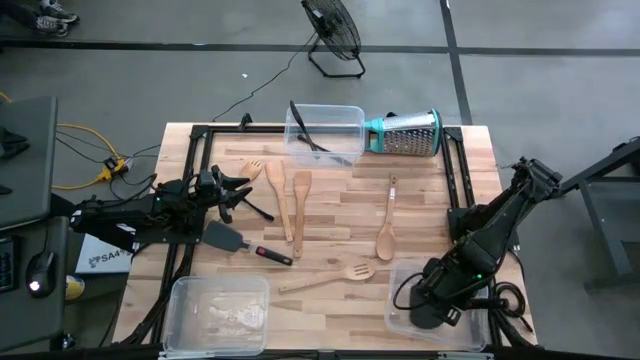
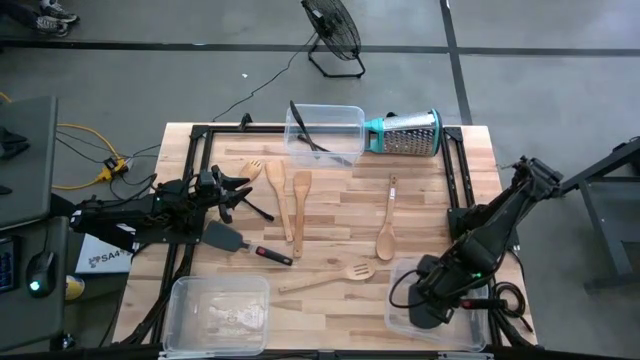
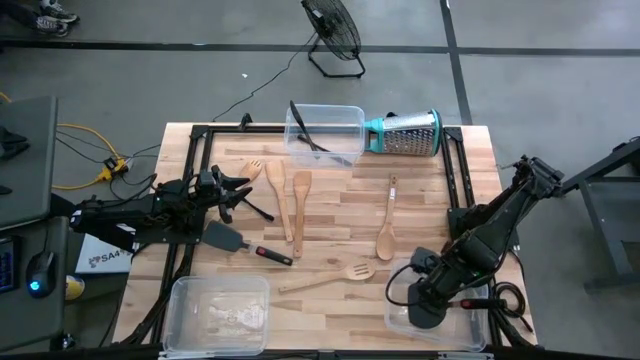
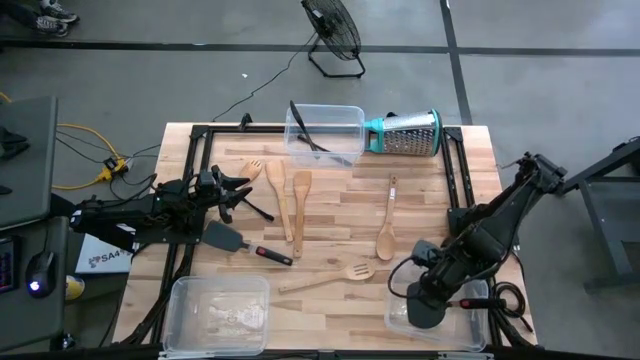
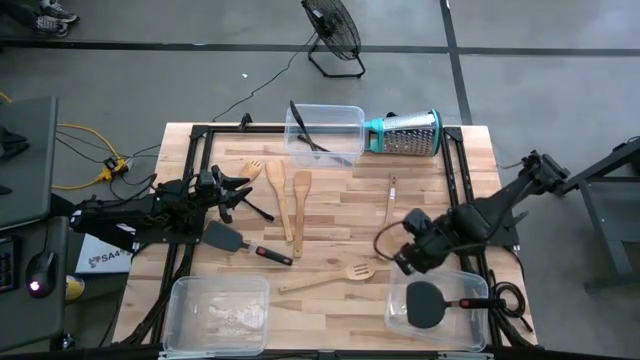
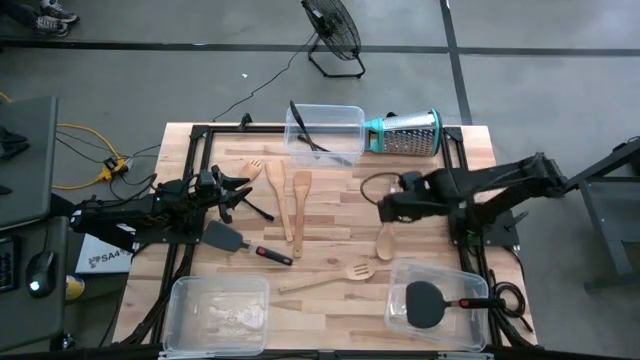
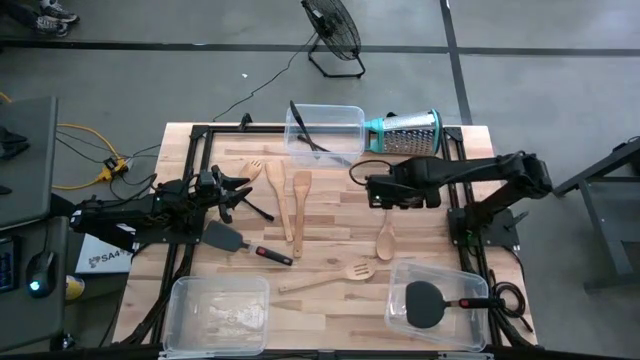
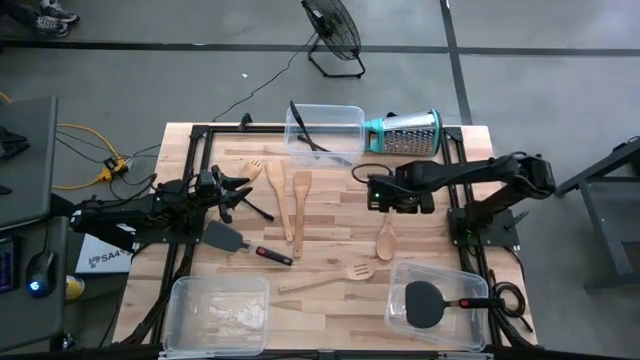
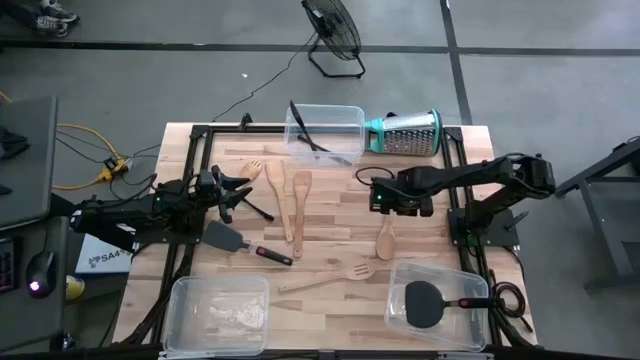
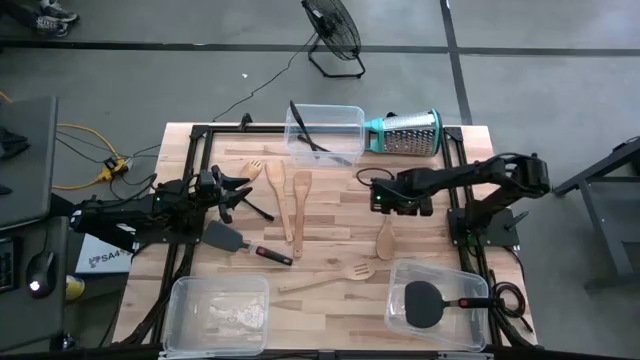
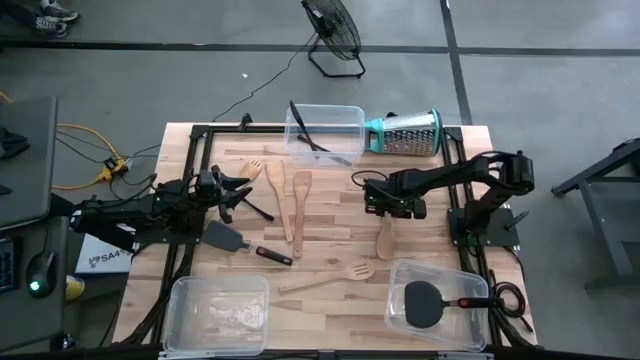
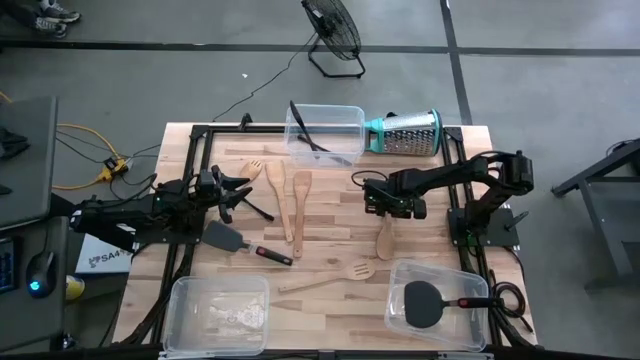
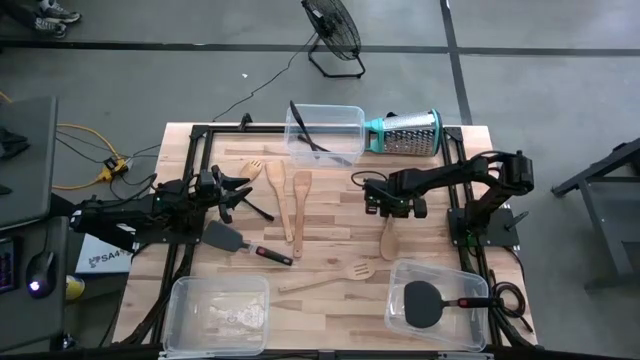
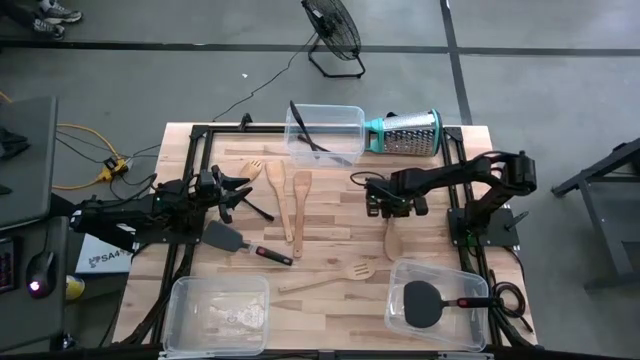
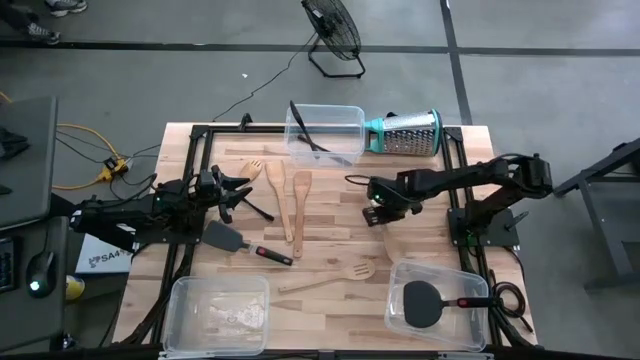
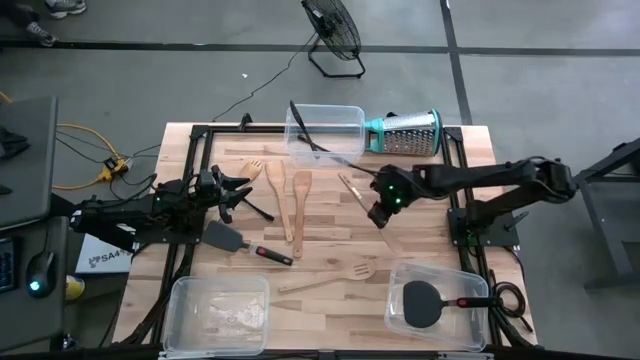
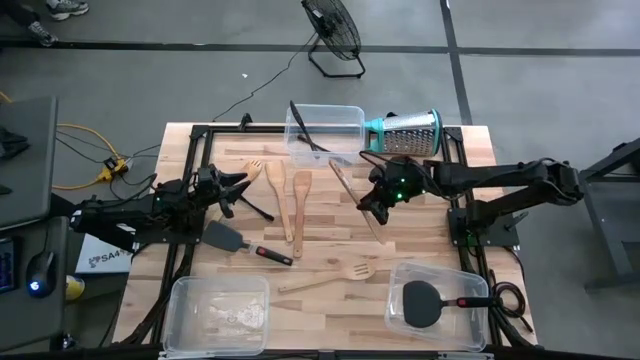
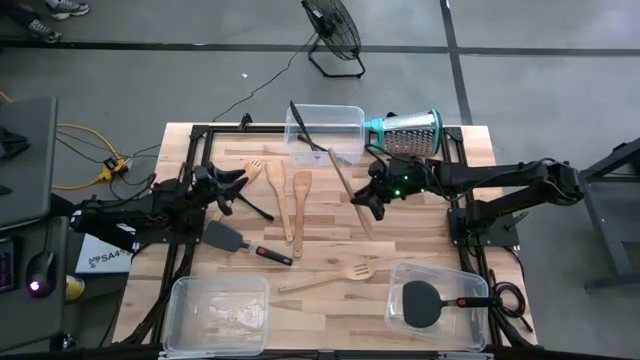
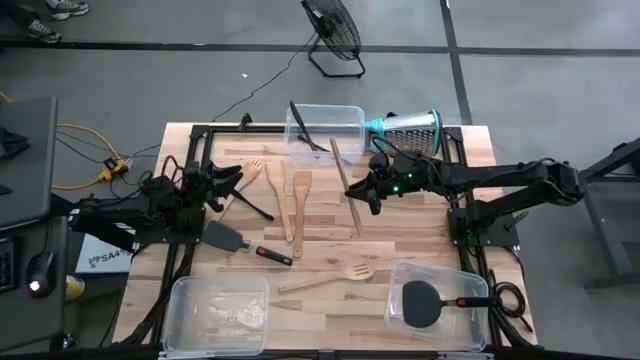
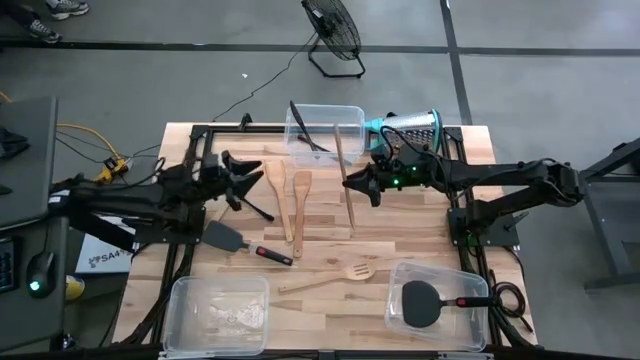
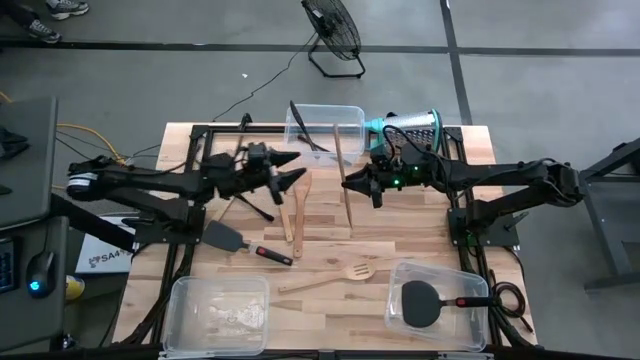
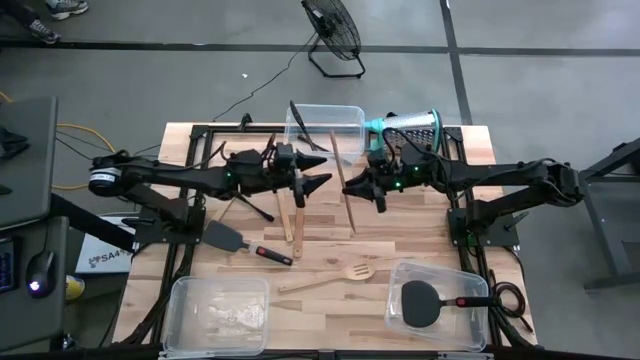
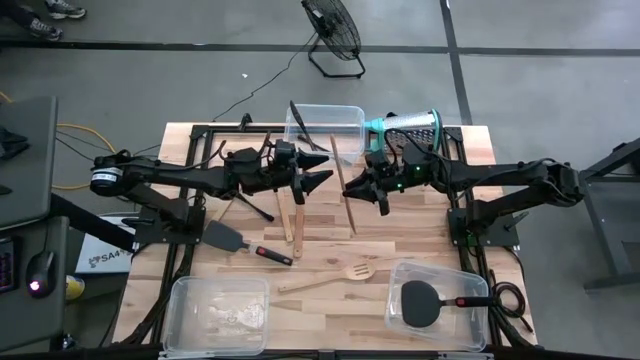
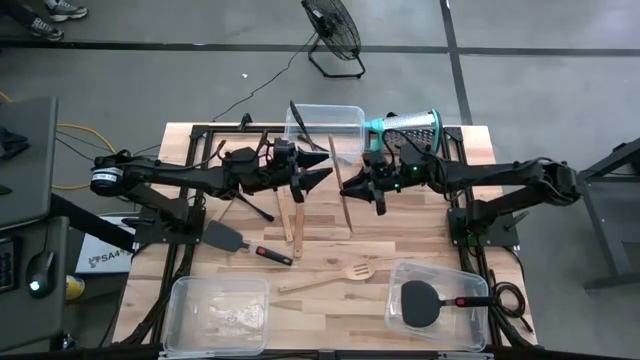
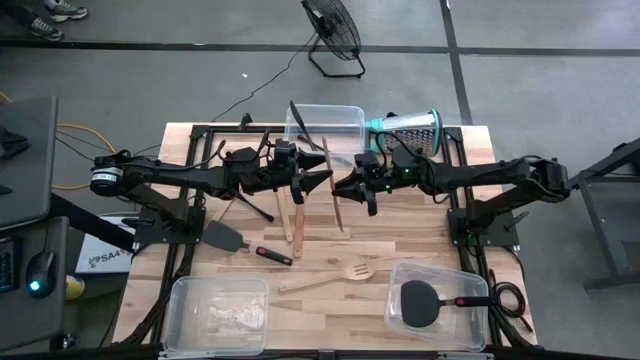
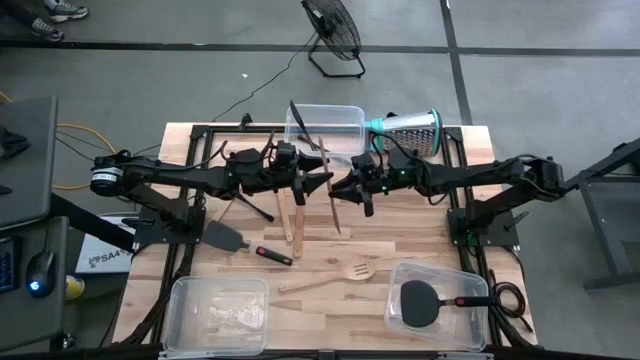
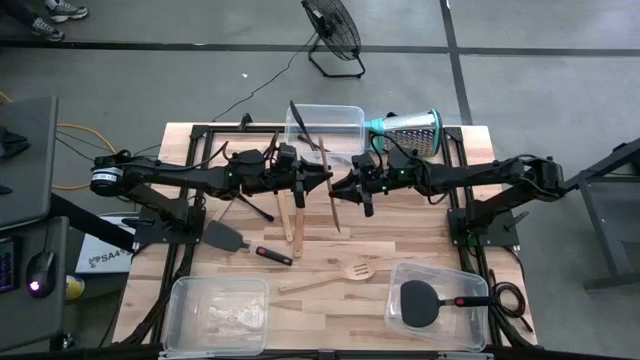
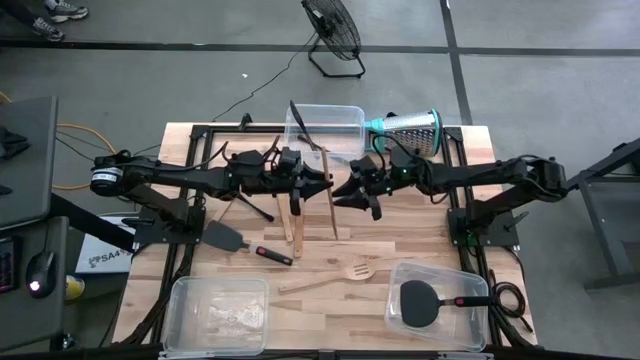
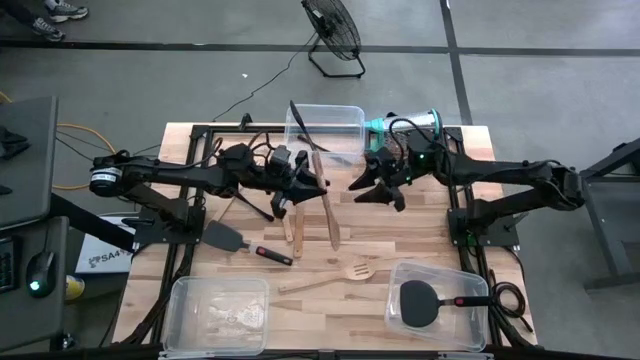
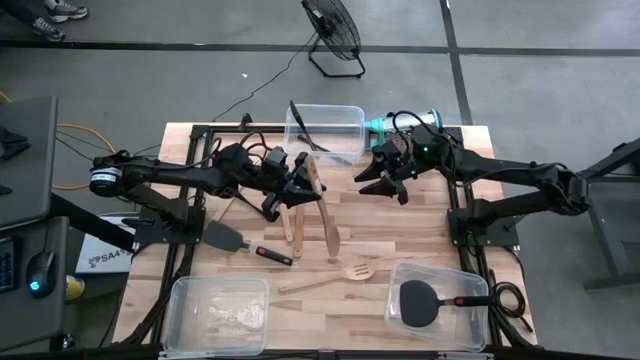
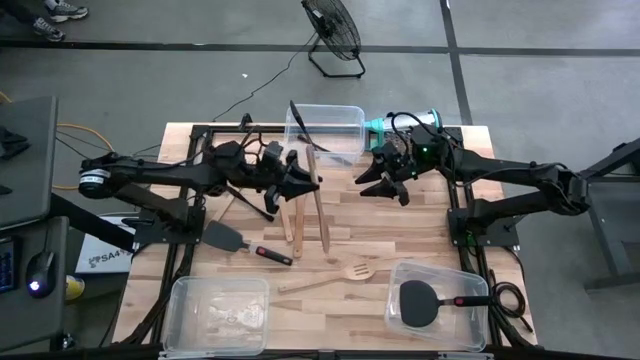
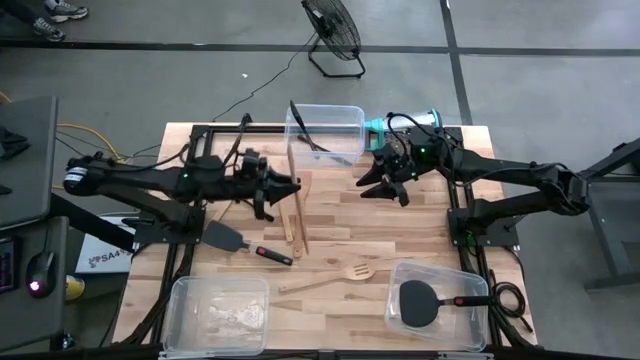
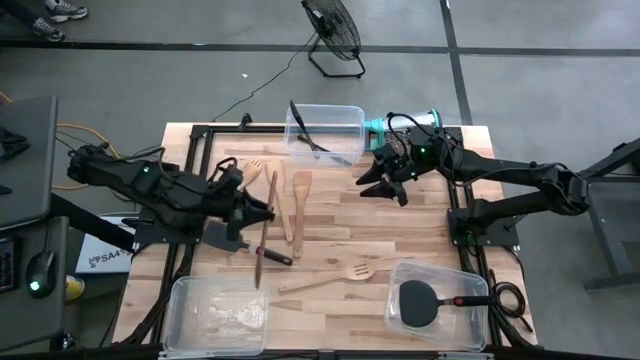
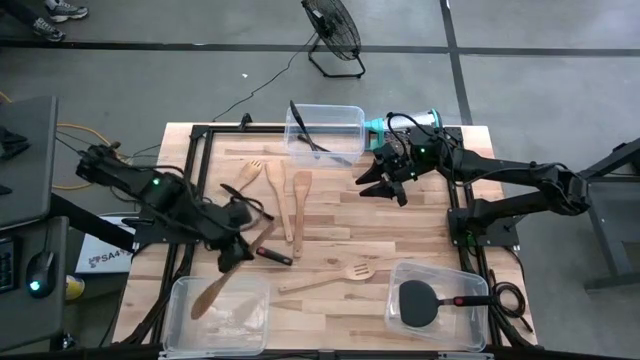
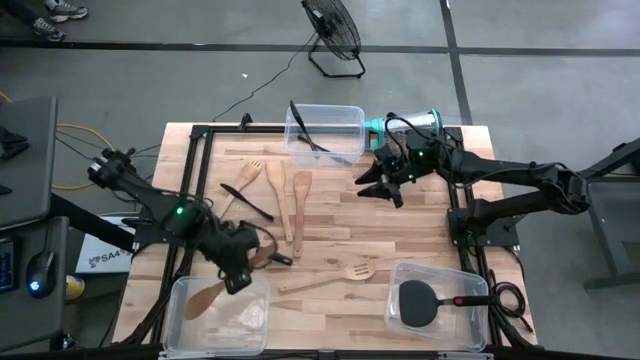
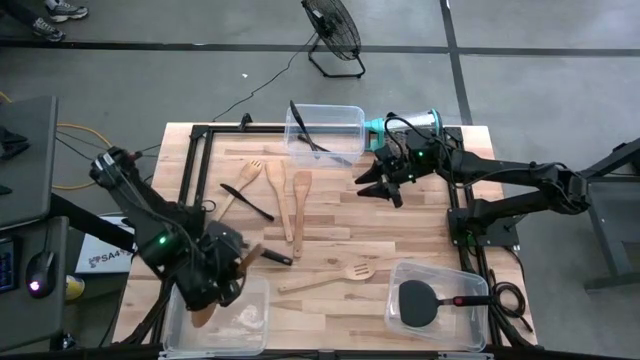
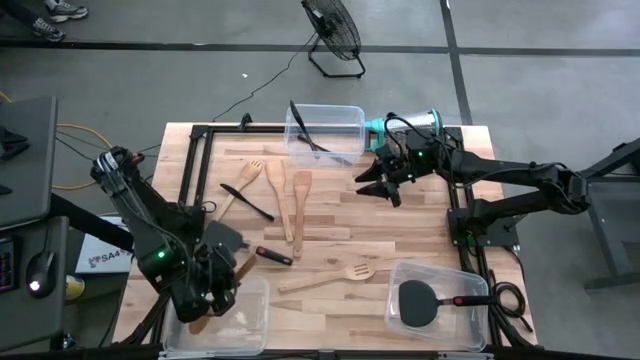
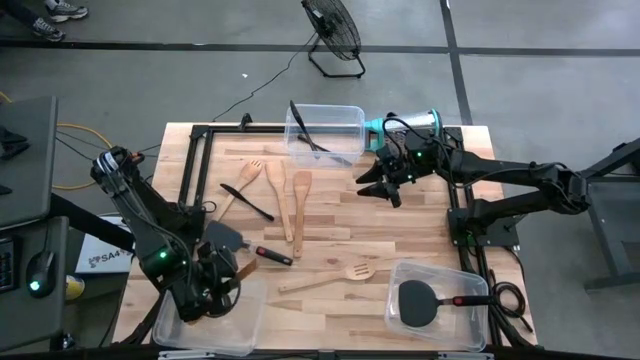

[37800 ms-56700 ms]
Task: Pick & Place Kitchen Items
Put the brown spatula into the bottom left transparent bin

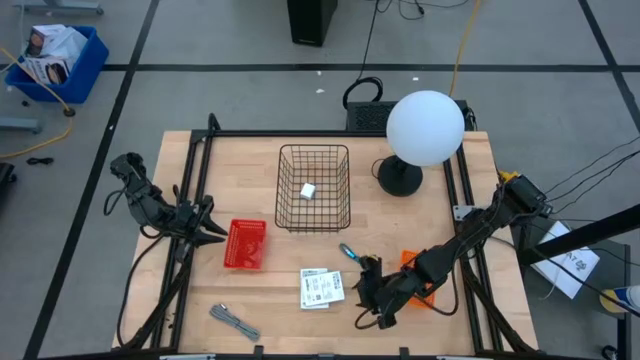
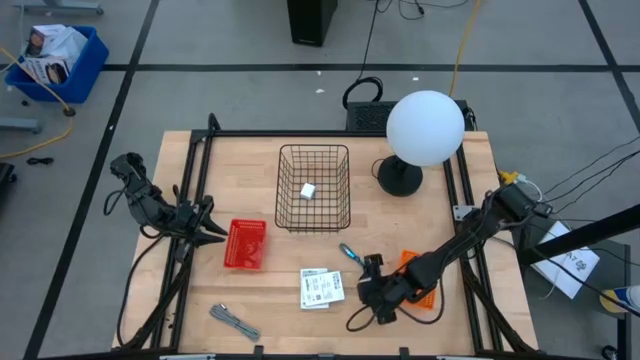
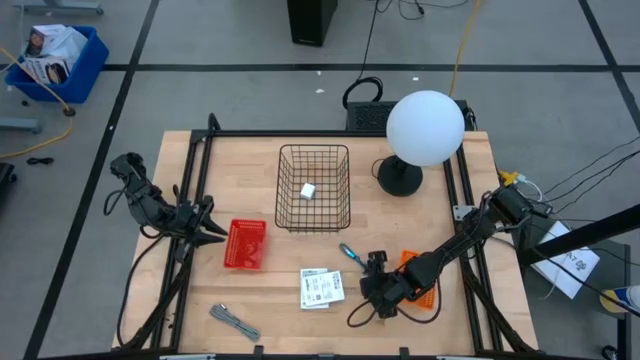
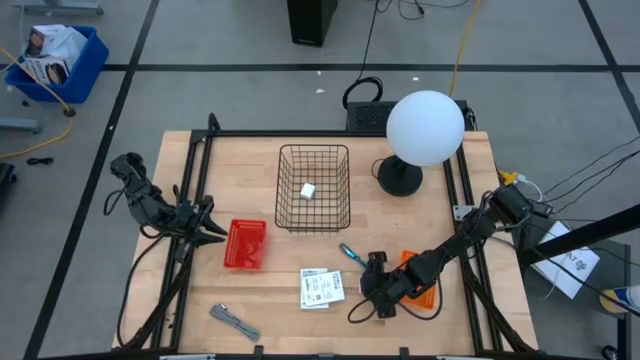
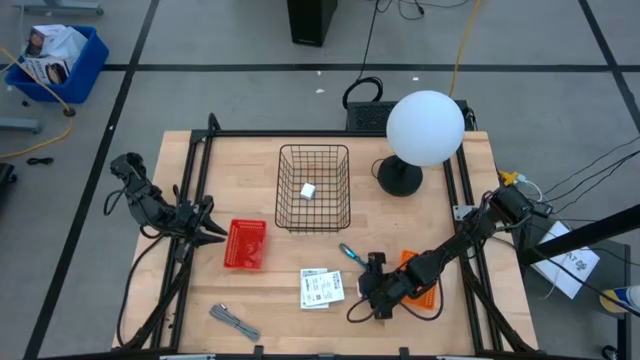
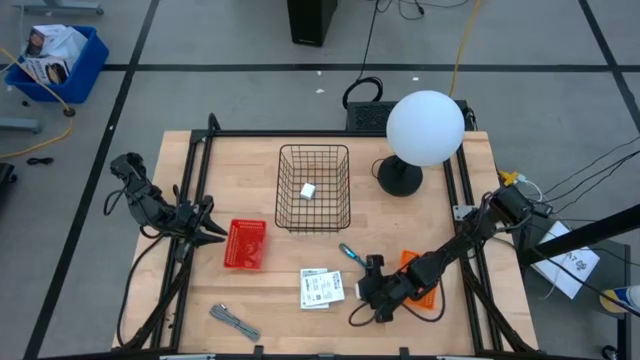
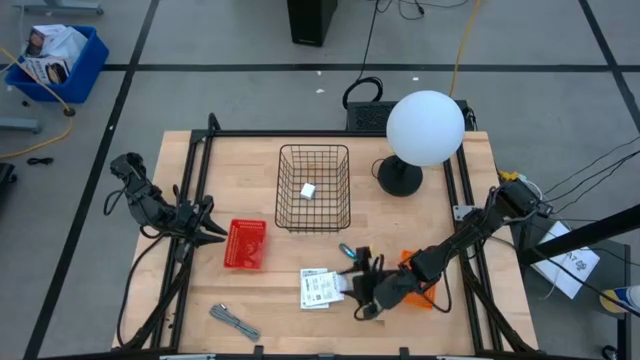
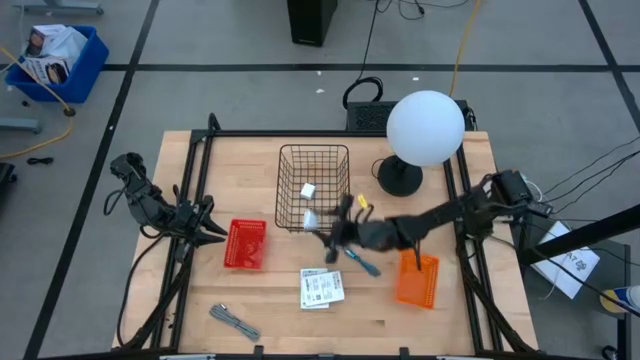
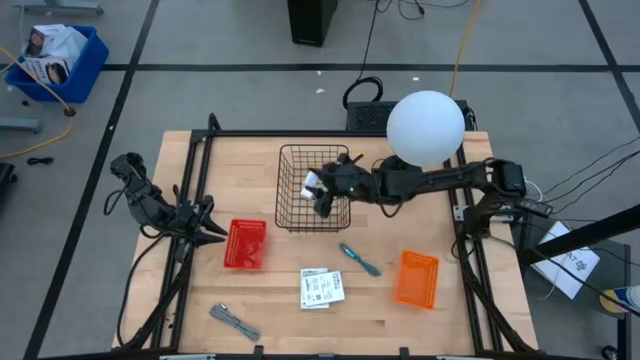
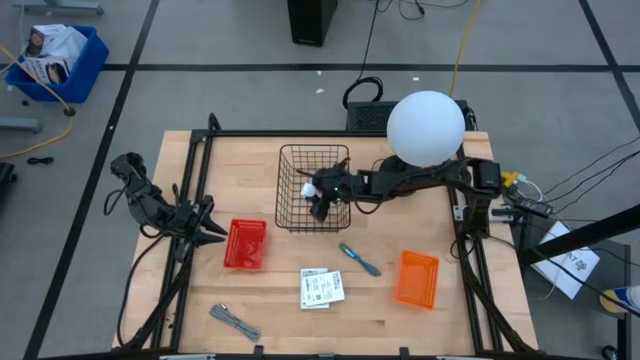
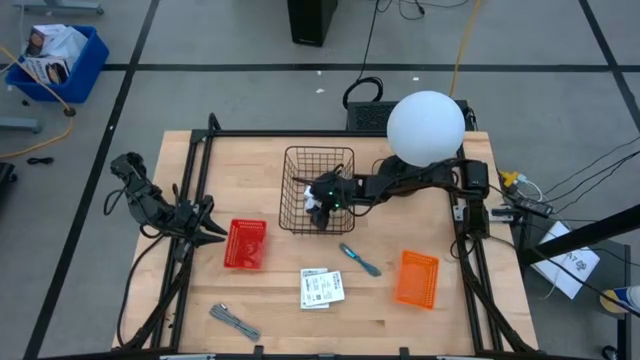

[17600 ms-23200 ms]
Task: Pick and place items into bin
Put the white charger adapter into the black wire basket
